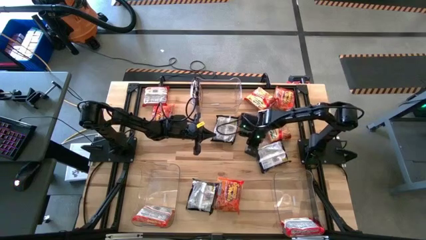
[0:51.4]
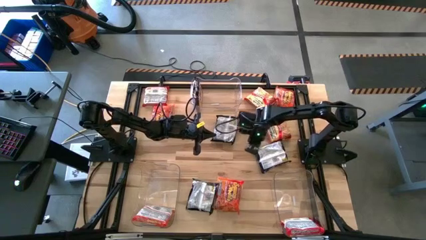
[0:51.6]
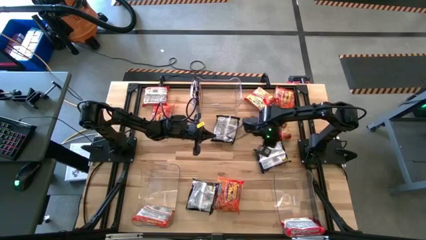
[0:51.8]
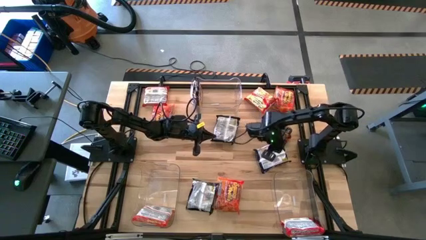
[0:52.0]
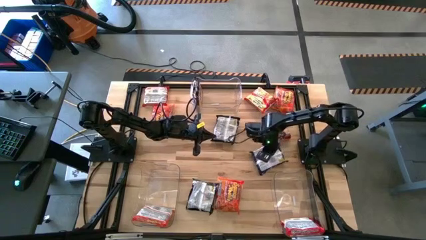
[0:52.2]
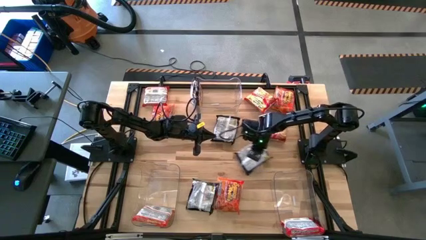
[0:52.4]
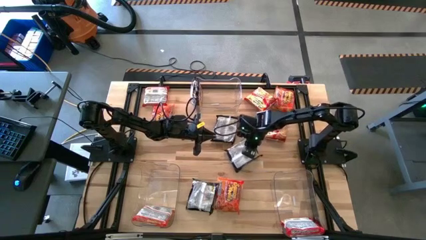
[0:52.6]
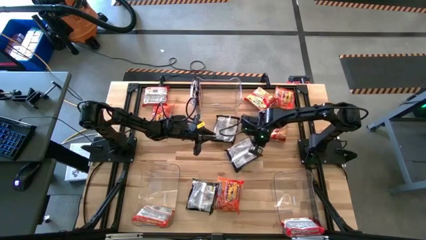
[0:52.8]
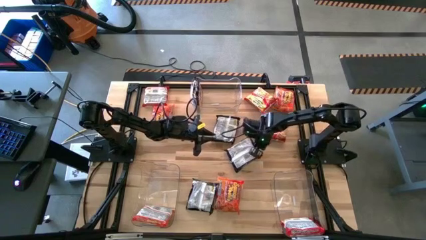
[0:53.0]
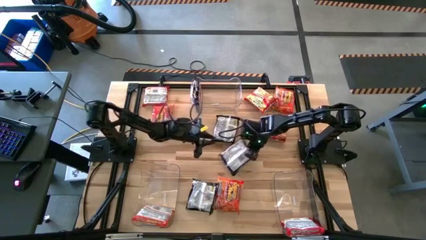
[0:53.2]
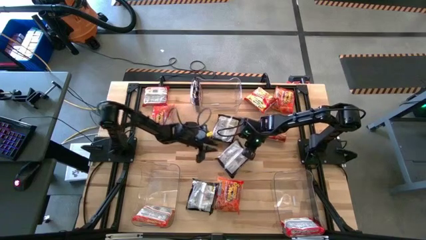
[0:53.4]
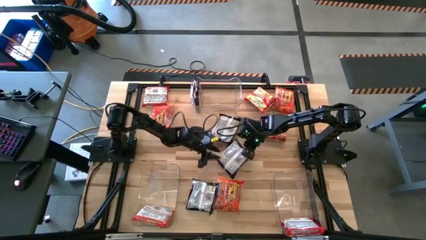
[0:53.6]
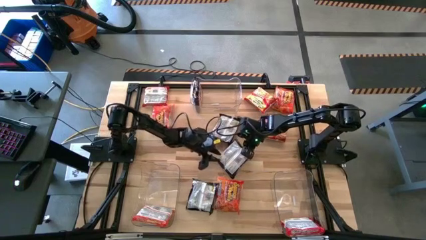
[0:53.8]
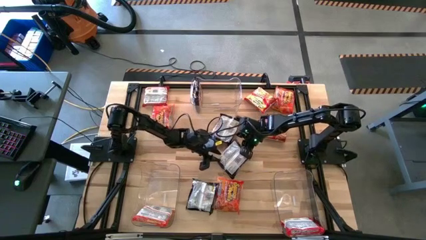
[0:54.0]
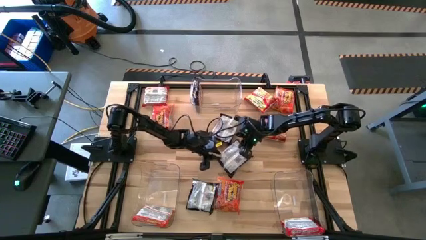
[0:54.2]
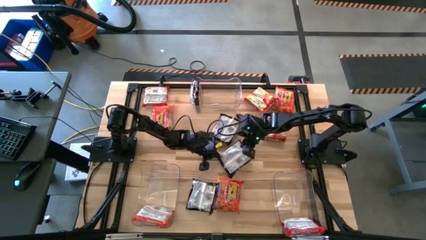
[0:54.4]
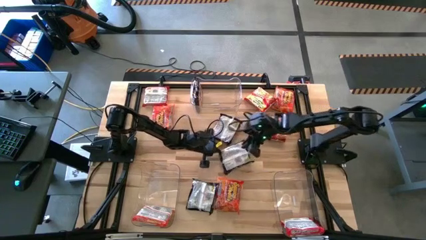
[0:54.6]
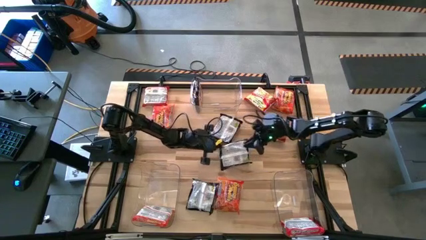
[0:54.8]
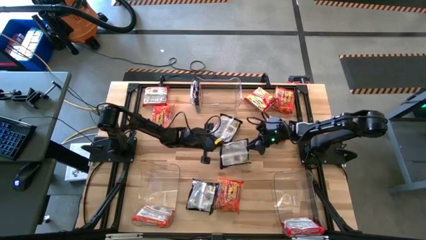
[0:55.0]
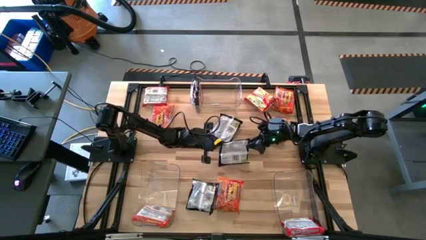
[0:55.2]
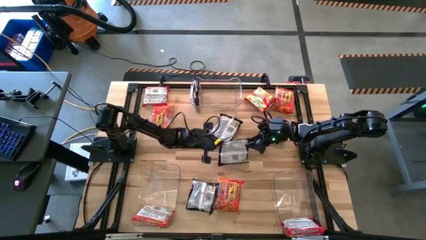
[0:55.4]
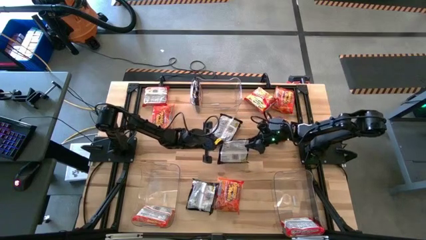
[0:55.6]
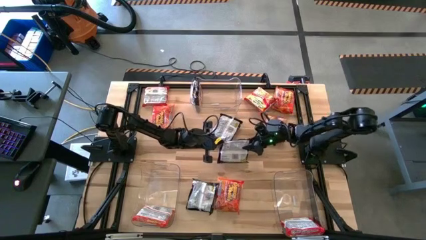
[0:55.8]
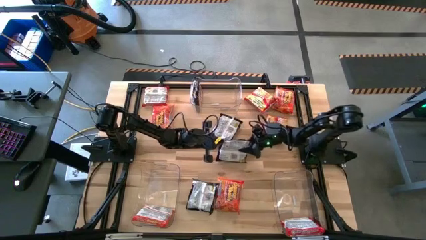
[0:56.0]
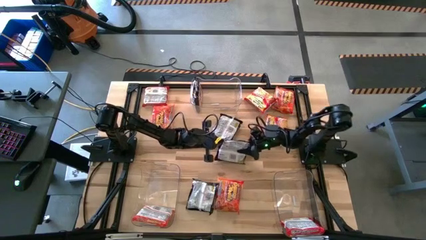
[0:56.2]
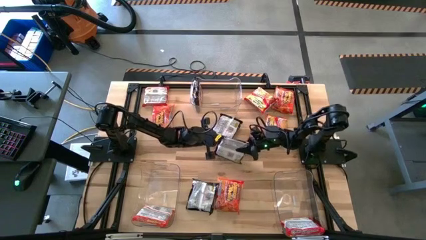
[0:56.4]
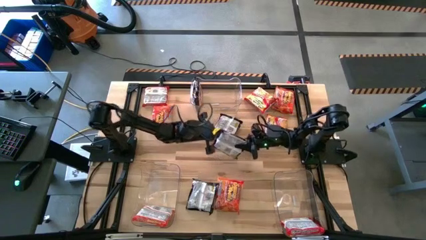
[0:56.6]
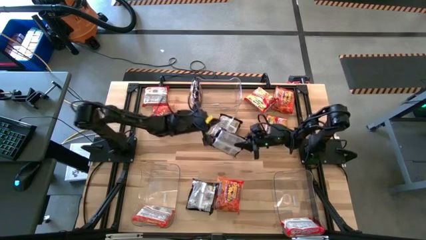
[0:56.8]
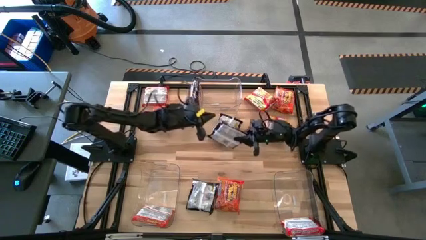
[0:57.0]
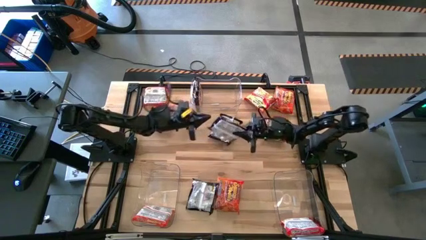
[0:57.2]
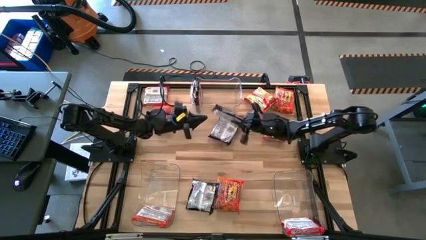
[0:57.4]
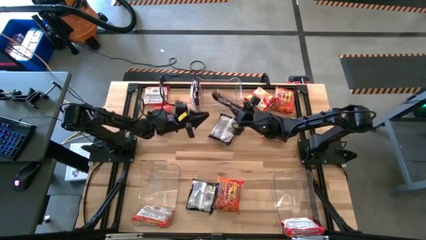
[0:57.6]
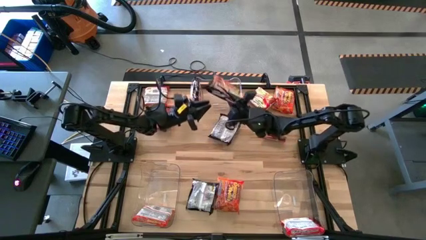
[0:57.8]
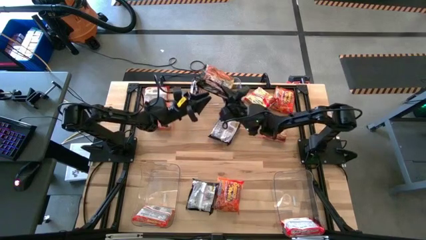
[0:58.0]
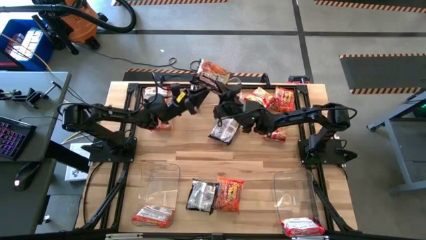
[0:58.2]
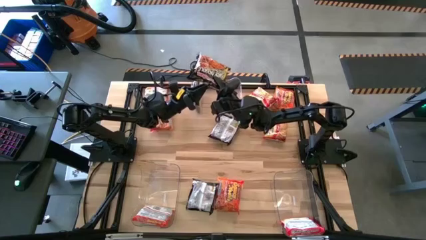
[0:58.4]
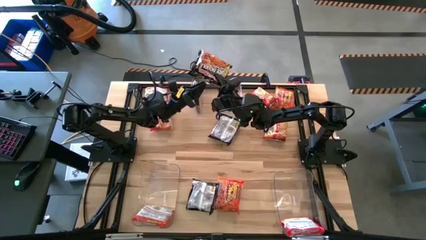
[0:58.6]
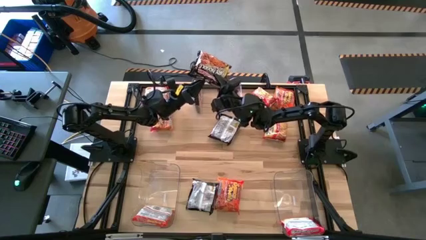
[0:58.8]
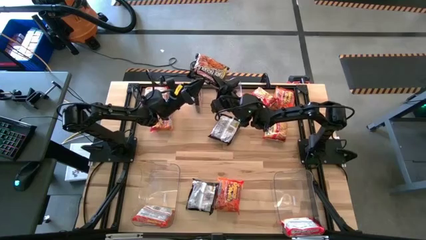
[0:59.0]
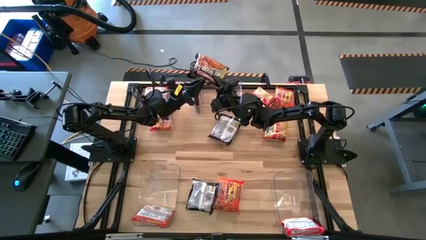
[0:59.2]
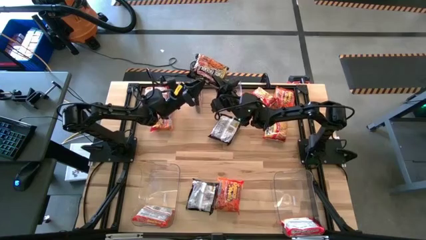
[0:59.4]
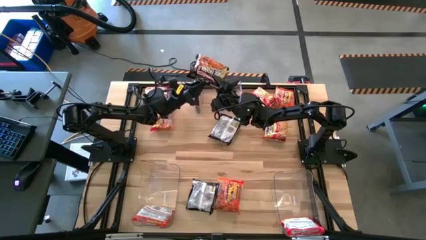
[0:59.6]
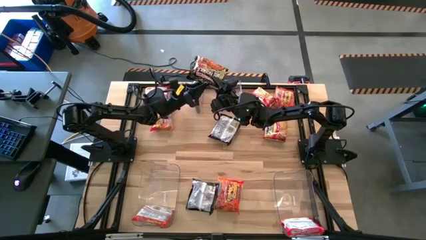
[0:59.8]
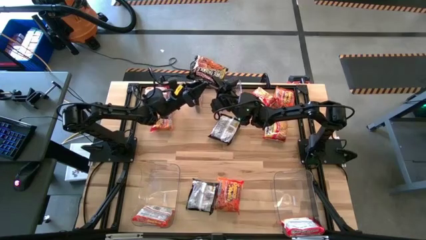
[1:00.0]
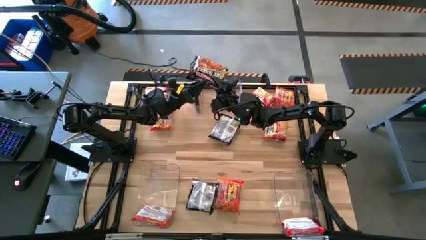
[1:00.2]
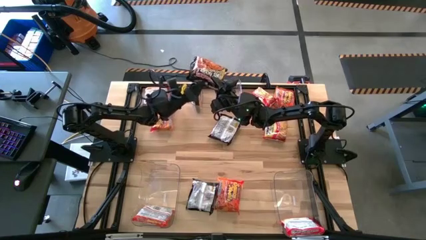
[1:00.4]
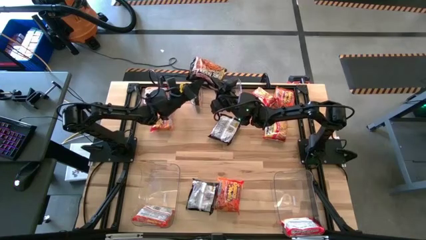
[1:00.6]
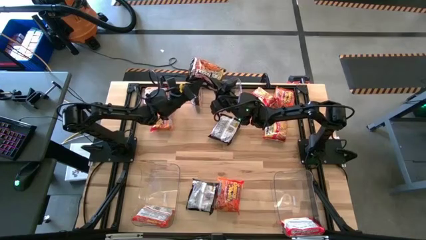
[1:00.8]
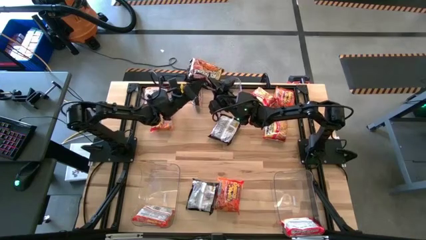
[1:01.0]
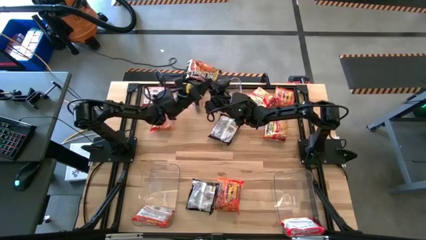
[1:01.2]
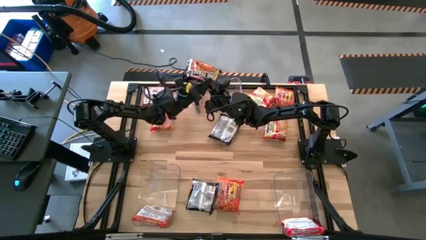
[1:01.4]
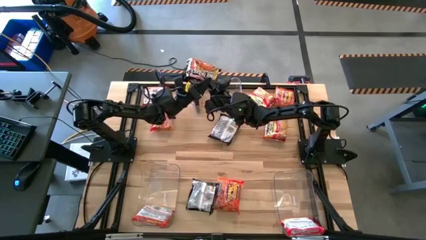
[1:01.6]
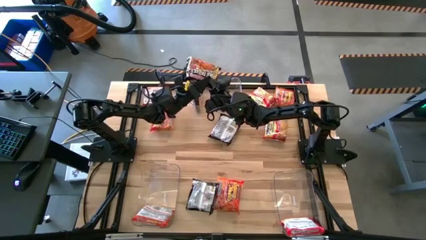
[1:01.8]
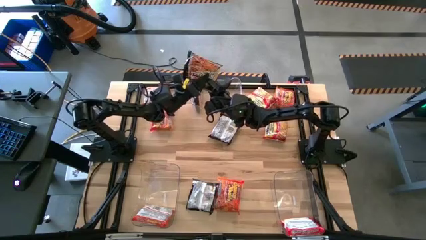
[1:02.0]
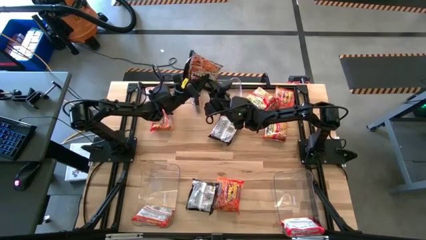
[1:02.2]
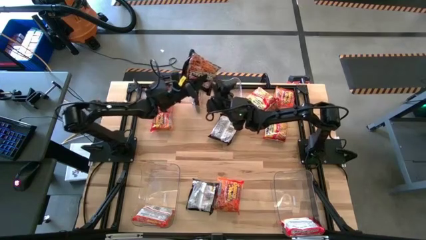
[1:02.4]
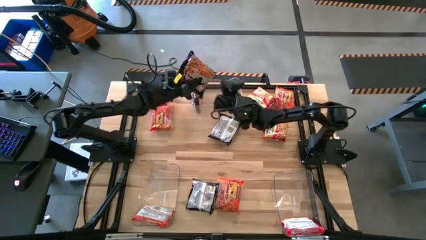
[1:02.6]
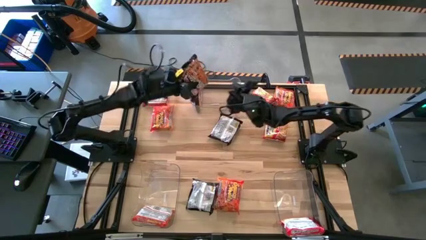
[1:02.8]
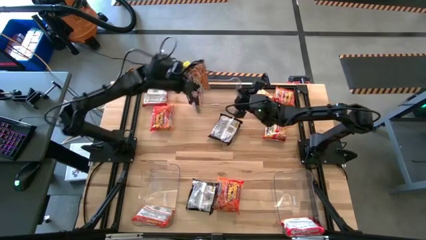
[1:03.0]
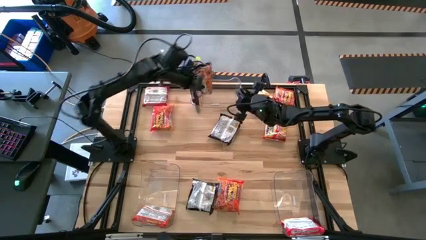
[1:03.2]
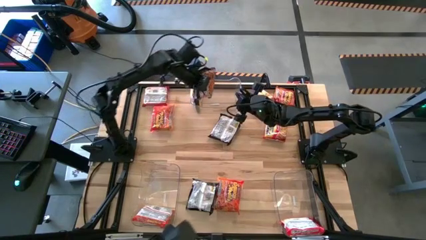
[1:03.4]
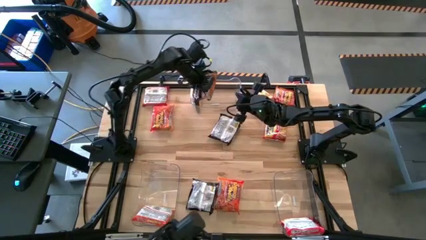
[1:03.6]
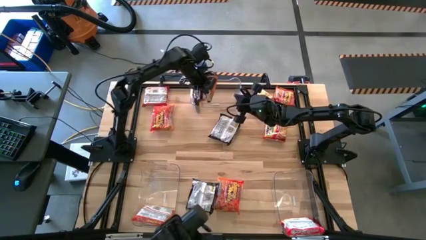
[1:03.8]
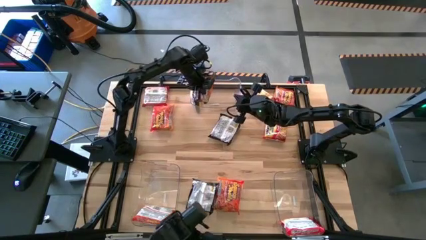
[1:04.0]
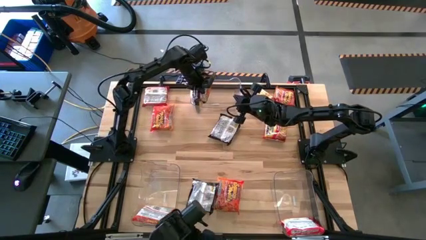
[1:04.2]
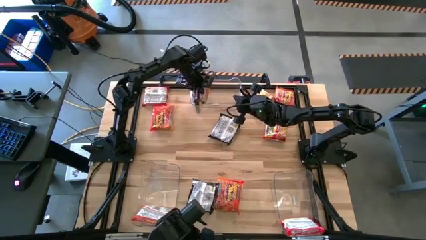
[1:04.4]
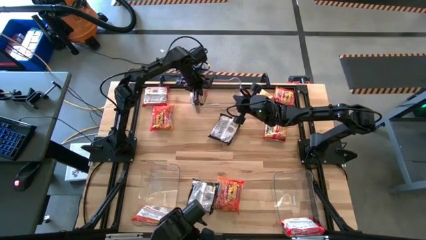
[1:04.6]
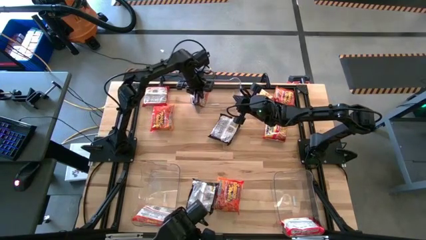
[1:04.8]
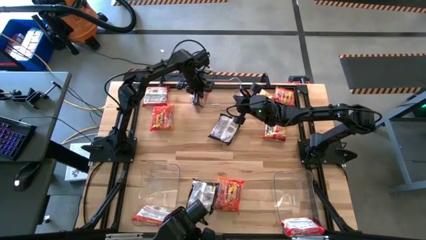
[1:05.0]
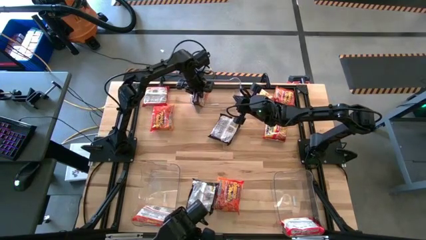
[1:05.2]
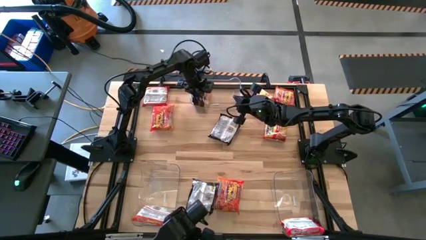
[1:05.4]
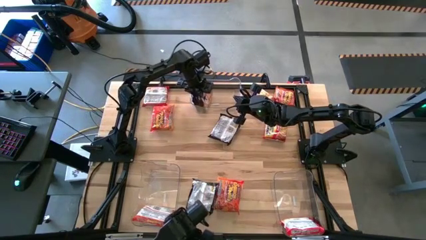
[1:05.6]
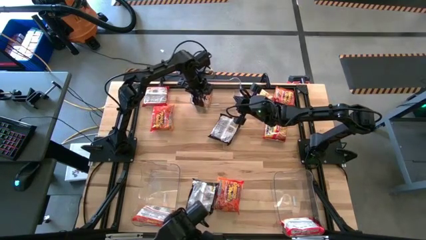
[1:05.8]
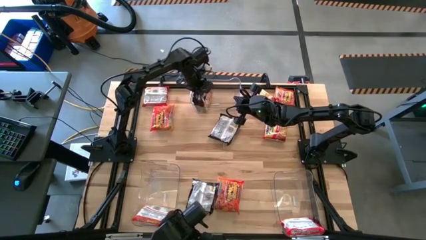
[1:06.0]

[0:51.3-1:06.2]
Task: Sort Maruchan noodles
Put the right black noodle pack into the top transparent bin

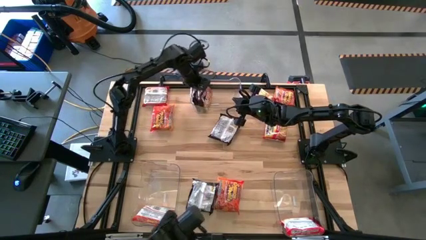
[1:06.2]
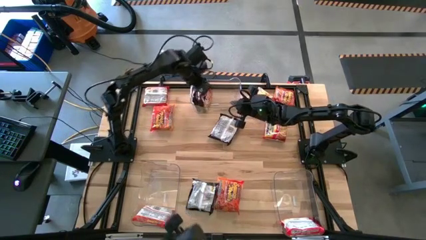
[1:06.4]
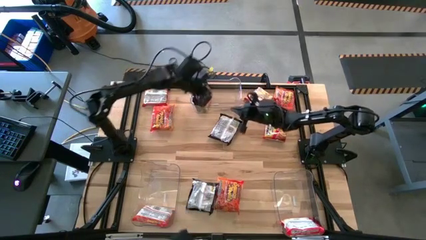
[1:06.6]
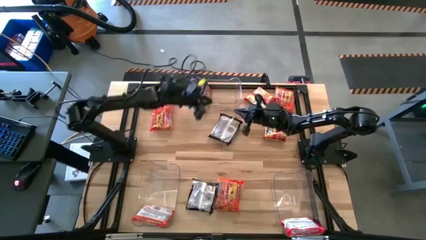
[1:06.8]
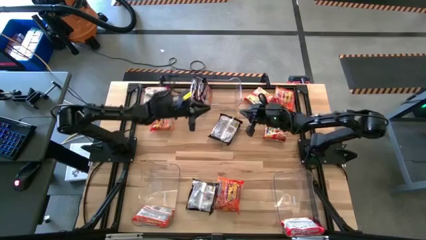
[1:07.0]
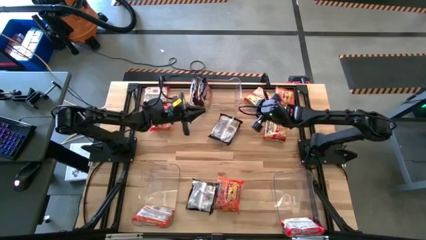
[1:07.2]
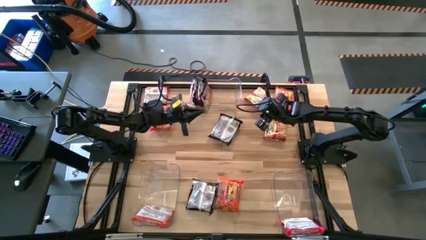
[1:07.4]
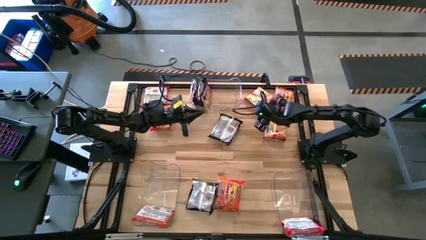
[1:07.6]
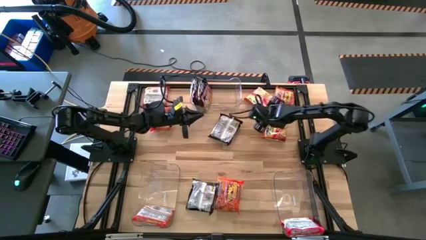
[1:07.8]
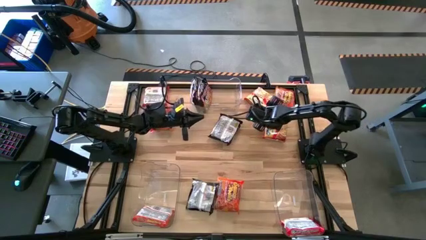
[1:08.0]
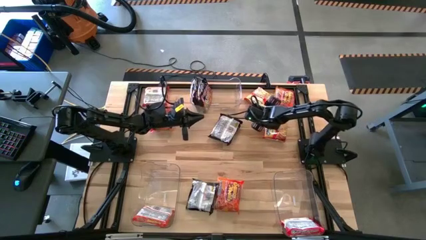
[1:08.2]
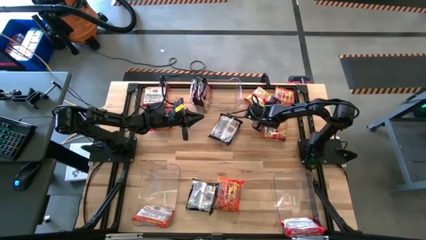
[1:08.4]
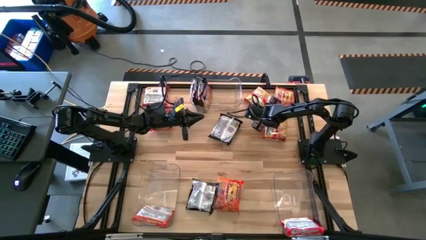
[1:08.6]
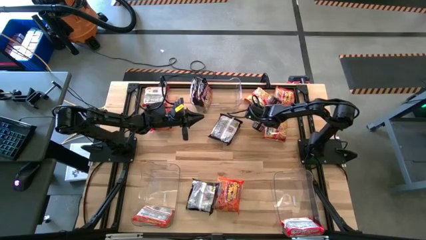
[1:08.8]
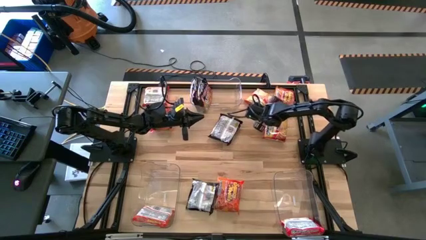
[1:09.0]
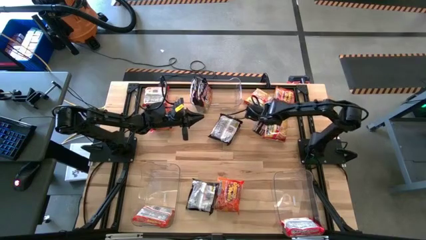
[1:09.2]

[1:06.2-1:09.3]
Put the top right red noodle pack into the bottom right transparent bin
